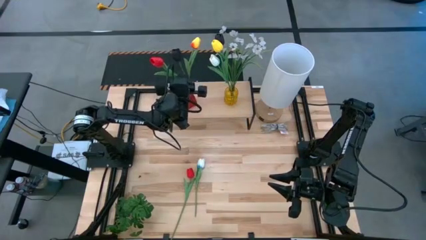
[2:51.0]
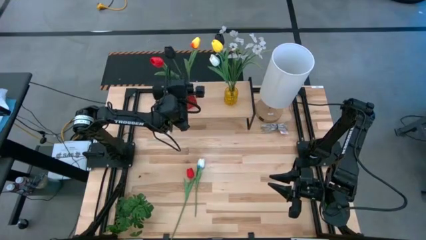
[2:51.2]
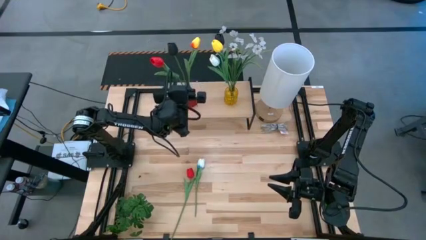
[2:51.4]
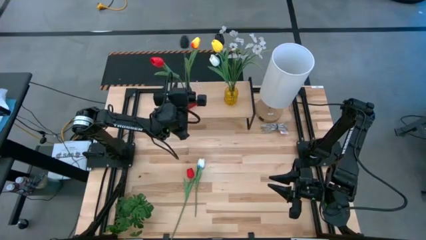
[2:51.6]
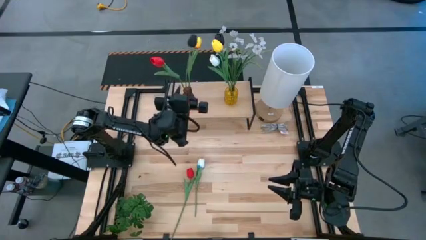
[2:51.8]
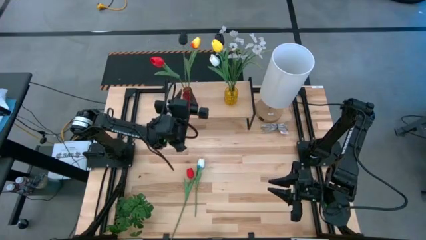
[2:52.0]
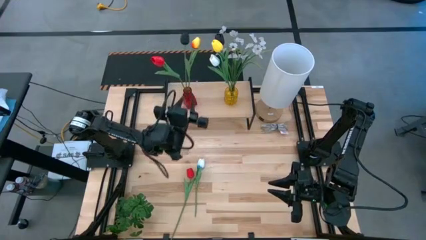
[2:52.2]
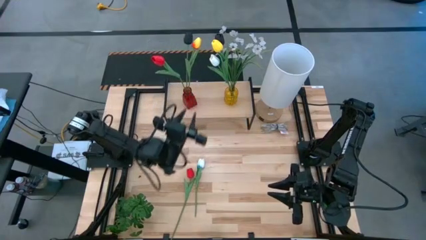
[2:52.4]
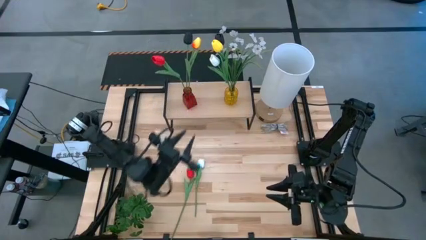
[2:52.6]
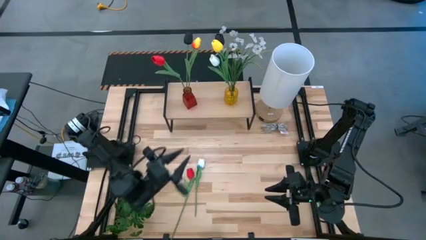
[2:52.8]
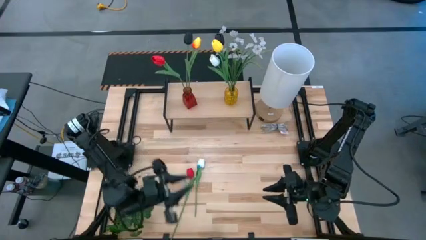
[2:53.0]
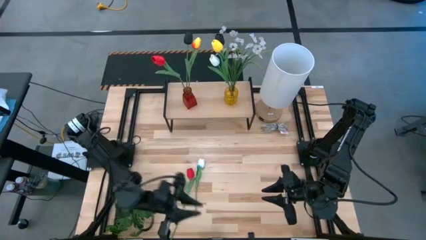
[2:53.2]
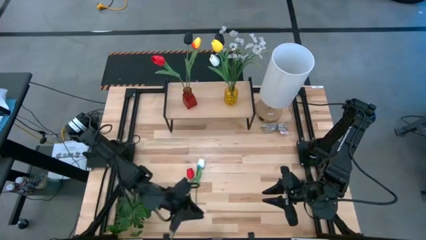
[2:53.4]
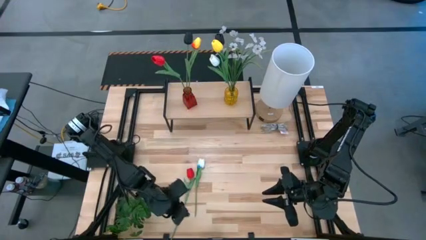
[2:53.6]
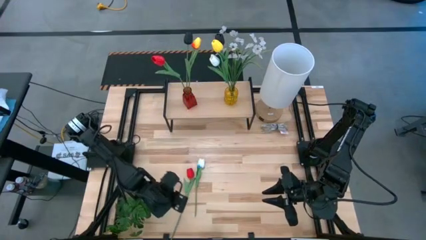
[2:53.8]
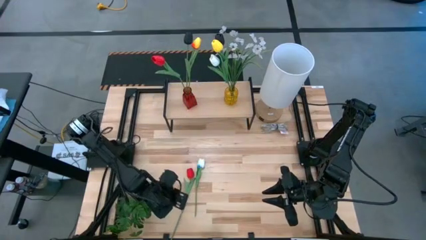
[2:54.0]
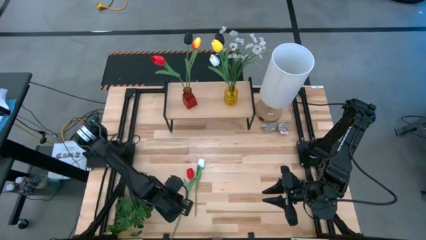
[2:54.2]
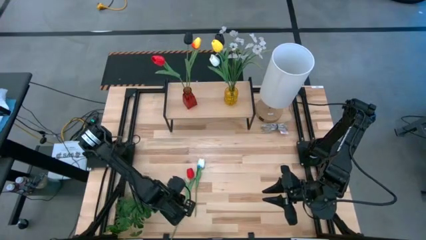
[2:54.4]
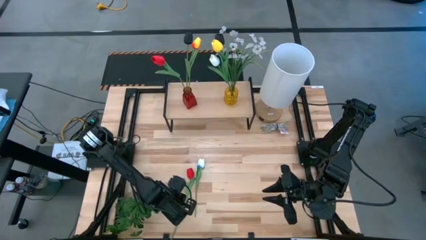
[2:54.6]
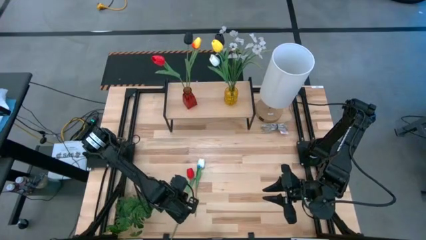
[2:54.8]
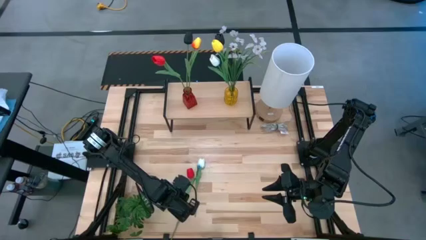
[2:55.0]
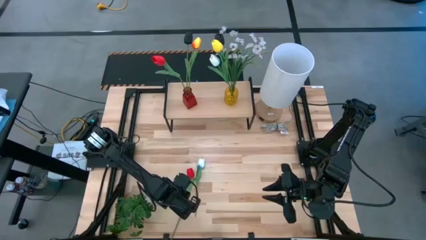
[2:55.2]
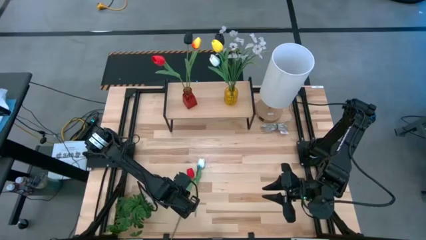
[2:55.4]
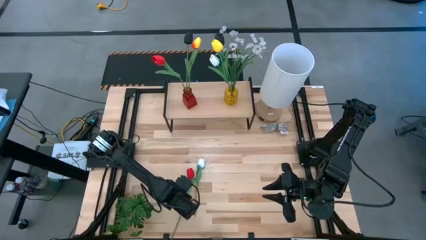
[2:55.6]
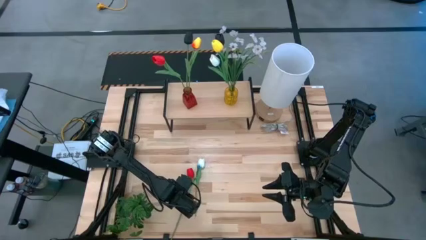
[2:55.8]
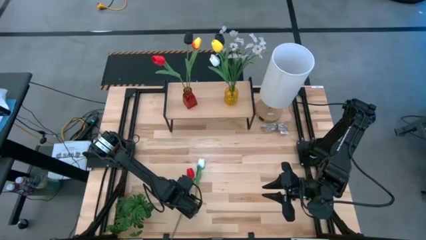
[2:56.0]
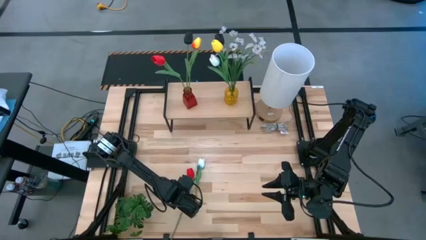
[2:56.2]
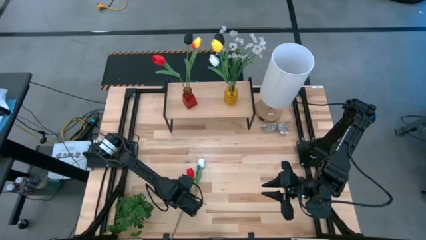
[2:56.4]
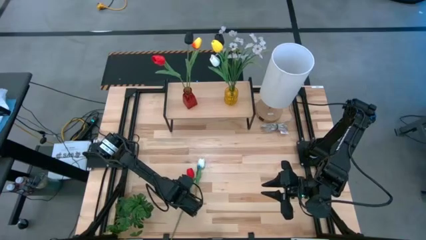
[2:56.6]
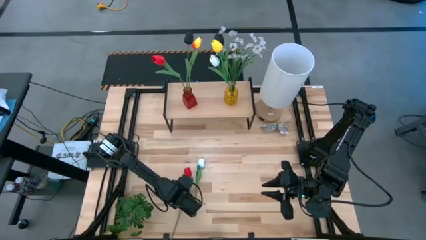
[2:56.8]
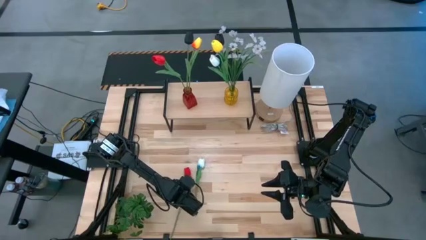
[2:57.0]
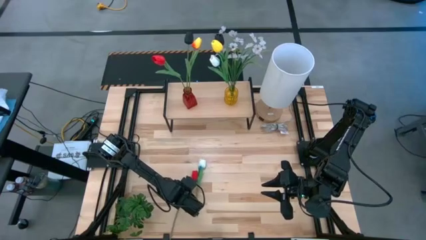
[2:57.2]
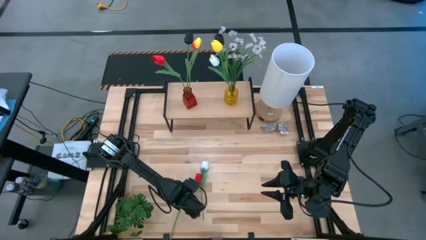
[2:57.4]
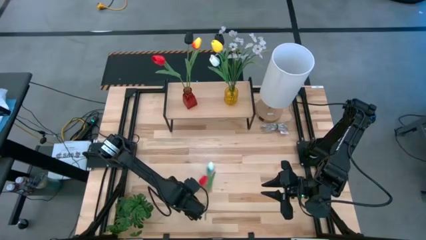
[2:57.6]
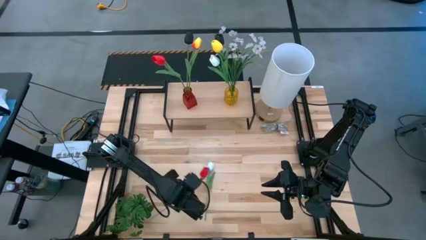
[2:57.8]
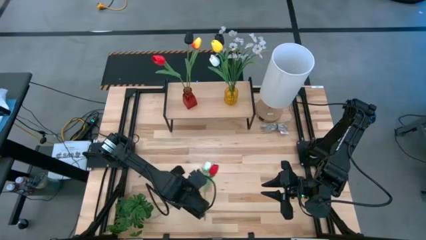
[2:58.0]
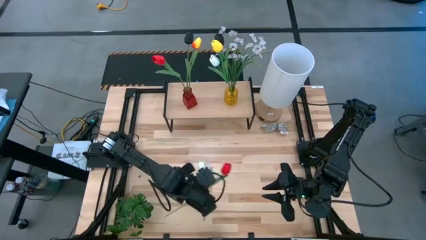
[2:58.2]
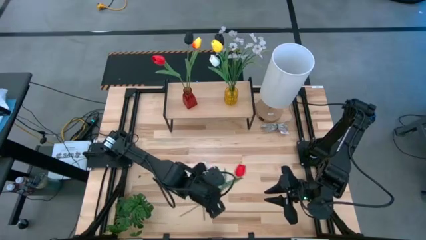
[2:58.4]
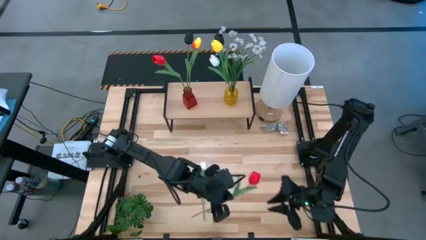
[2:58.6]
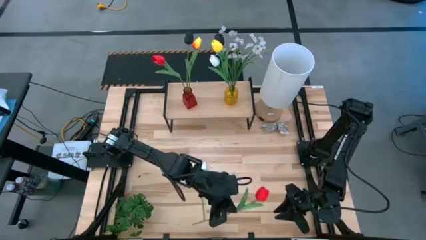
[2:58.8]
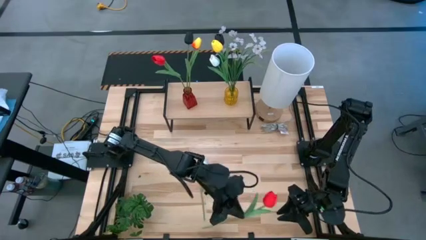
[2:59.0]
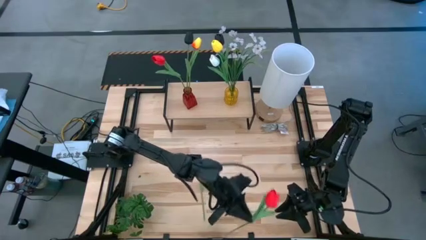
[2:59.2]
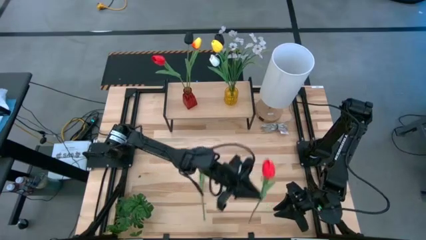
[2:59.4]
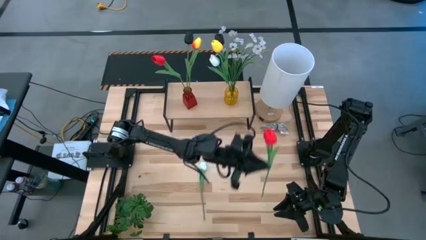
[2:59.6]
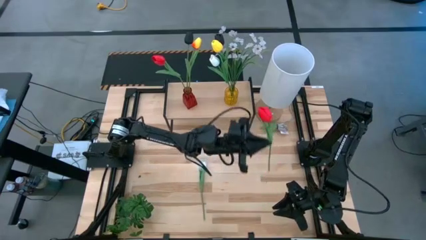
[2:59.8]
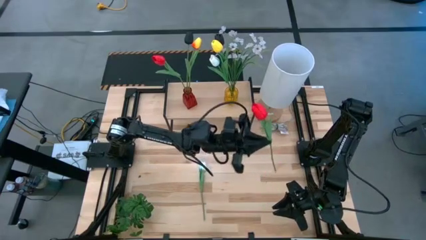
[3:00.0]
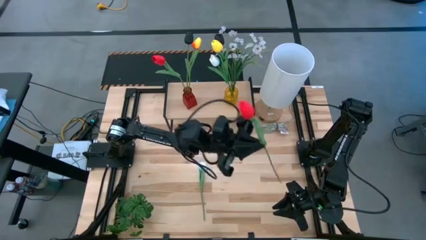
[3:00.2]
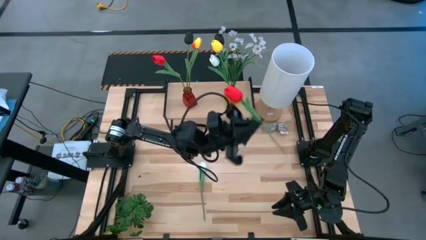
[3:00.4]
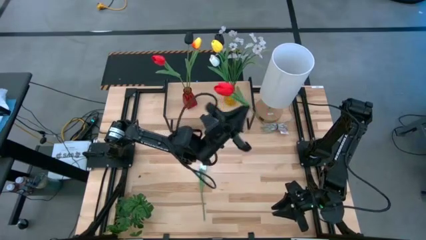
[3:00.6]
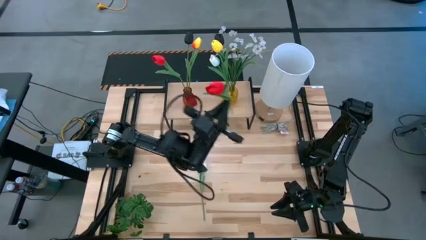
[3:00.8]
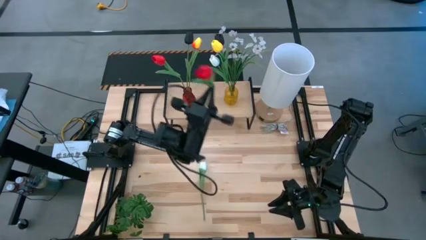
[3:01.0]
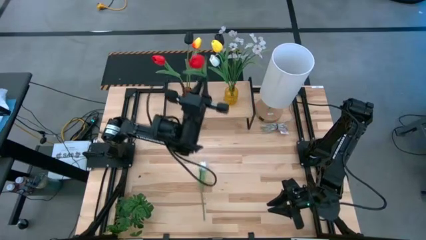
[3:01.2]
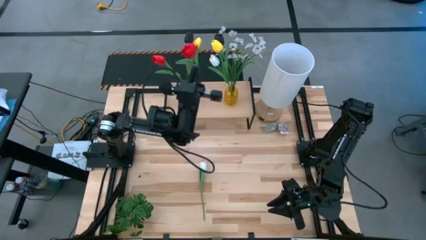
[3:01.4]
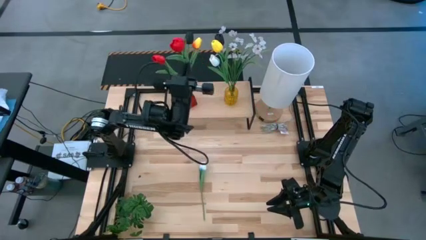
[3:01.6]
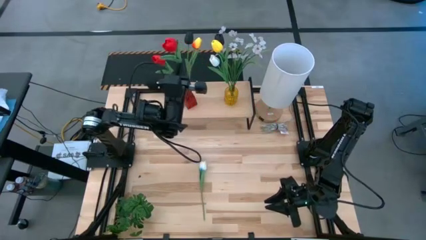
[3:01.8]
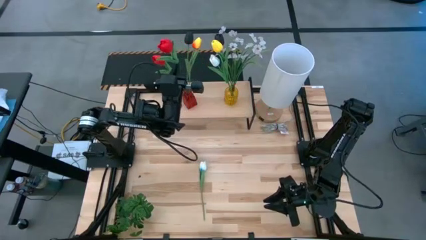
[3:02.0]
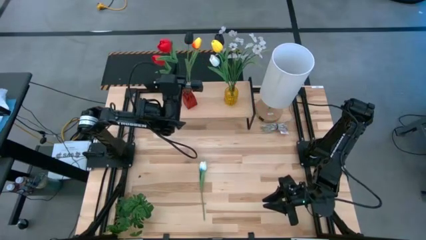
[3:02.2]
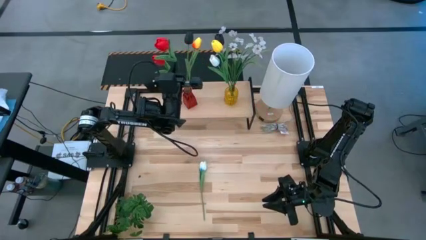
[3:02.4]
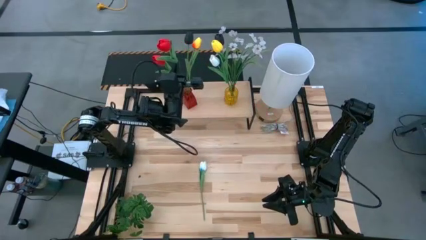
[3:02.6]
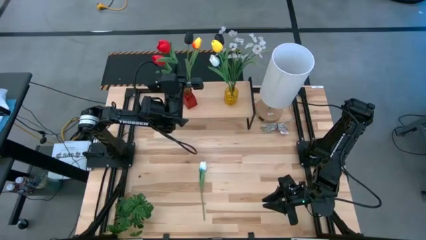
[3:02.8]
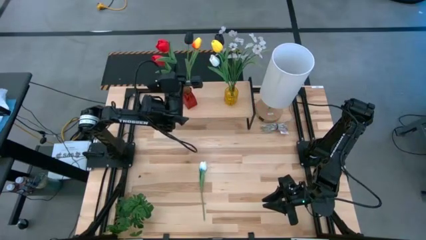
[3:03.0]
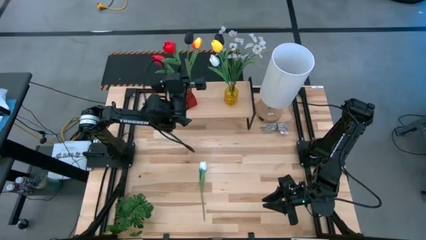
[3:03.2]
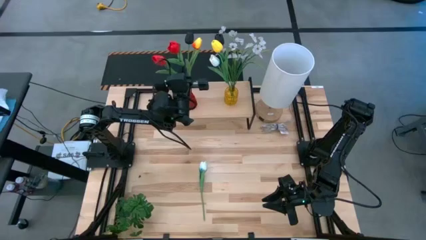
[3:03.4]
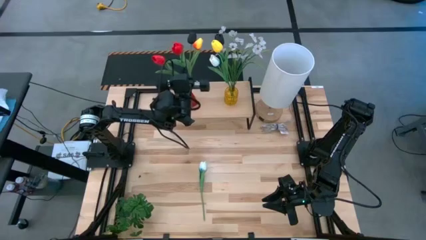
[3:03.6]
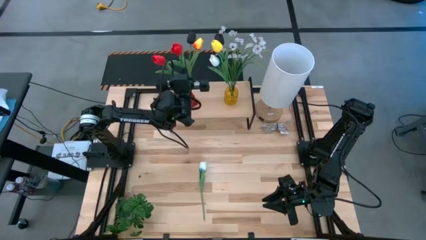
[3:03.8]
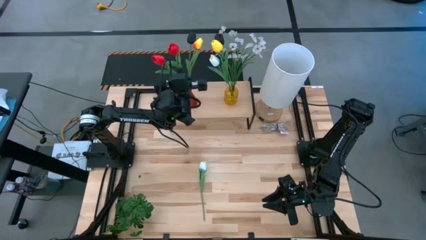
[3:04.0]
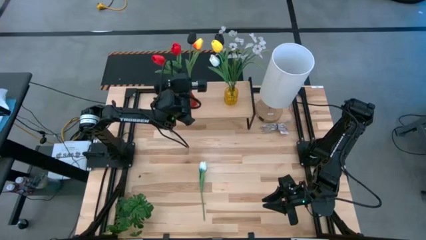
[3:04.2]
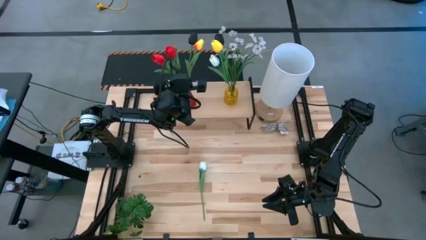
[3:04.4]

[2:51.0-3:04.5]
Task: Pick and place flowers into a vace then onto a shelf
Put the red tulip into the red flower vase

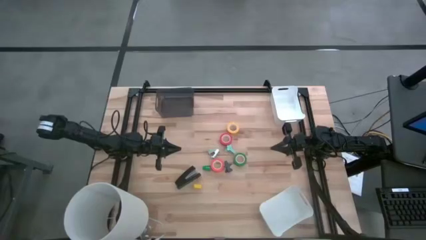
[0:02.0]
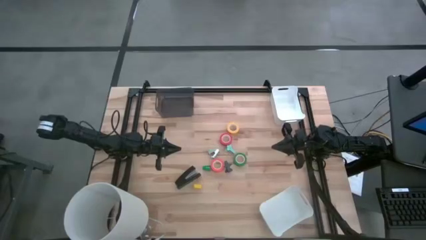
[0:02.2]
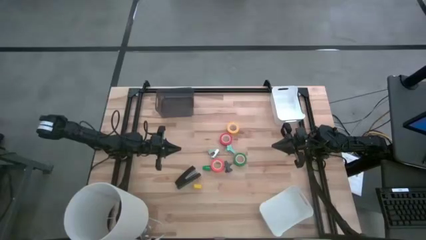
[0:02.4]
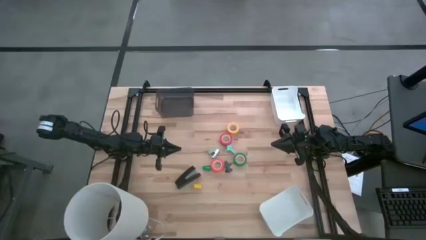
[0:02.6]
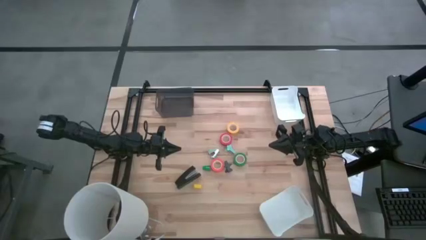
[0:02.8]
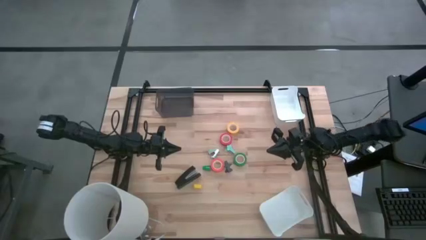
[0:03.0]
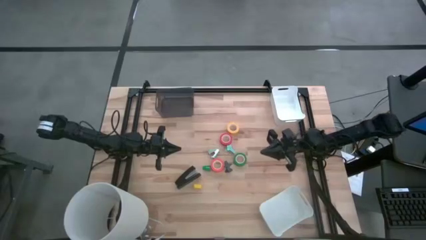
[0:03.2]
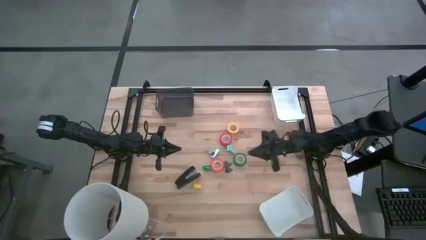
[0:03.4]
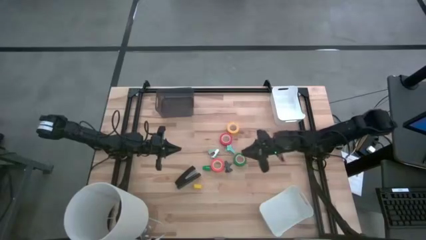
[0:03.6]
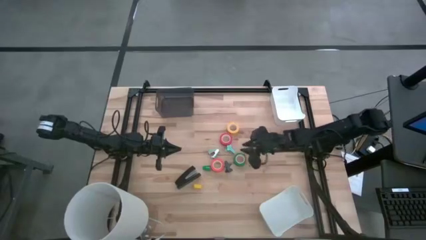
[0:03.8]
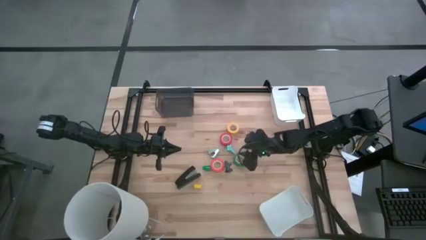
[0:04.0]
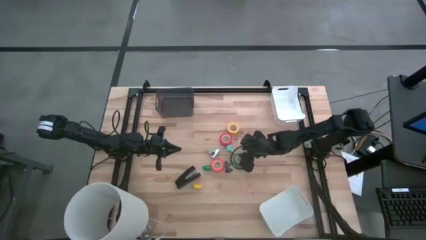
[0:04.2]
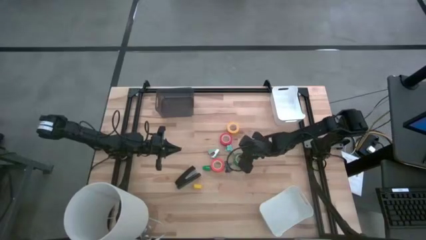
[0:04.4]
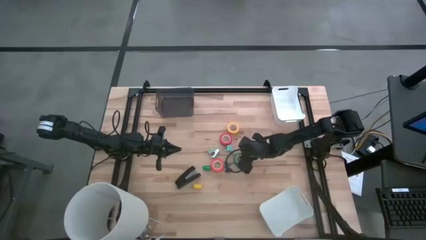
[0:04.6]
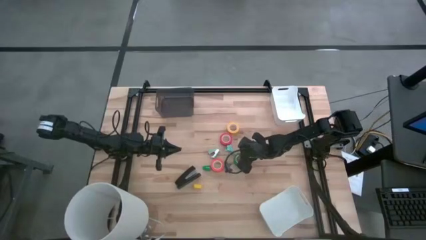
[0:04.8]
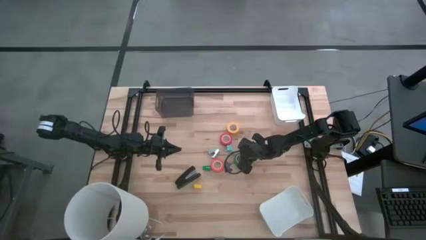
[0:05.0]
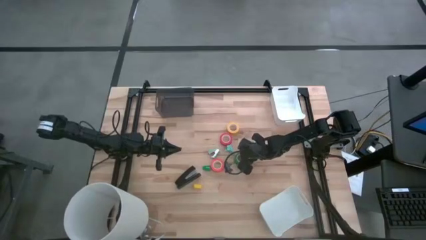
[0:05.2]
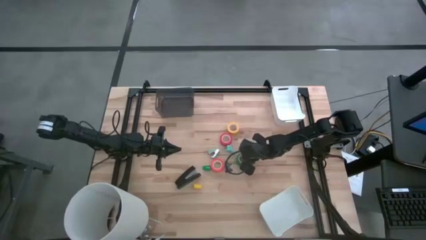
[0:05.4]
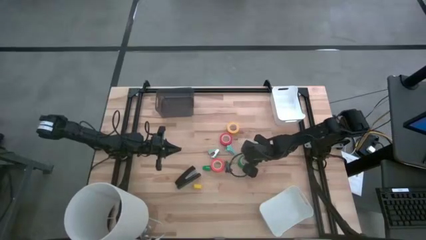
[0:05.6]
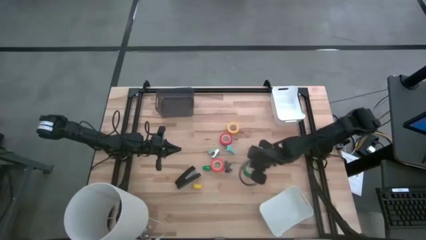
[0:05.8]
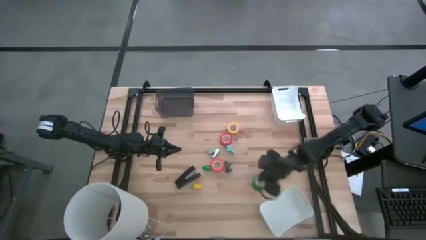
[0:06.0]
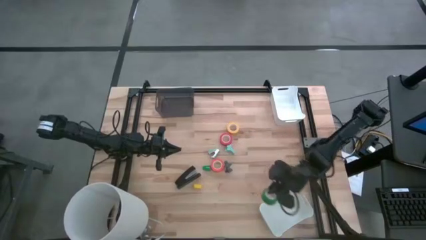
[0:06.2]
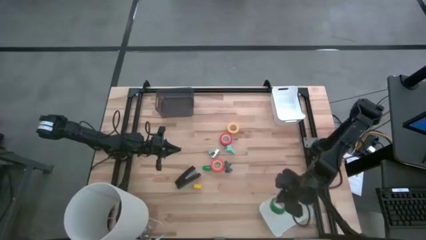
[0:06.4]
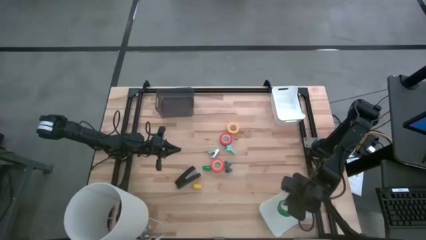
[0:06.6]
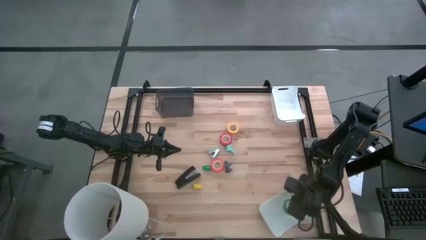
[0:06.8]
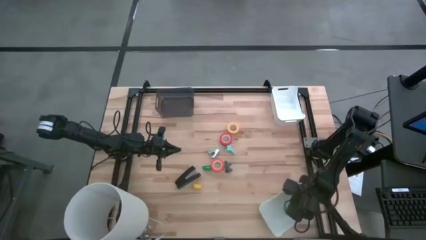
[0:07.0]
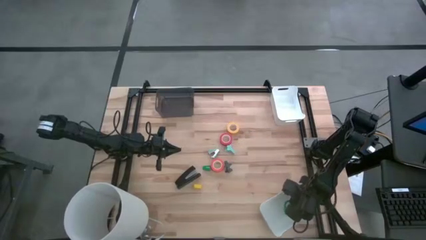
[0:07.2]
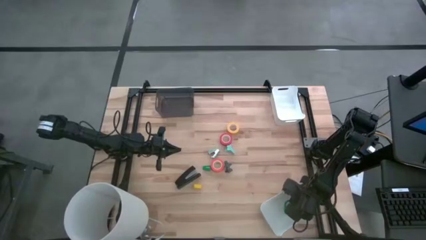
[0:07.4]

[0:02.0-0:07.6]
Task: Pick and place Stapler, Stapler remover, tape
Put the green tape into the bottom white bin
